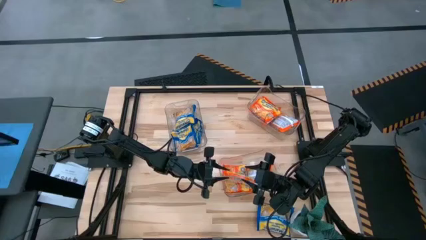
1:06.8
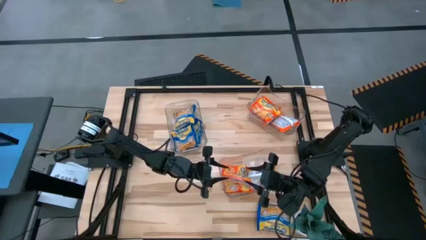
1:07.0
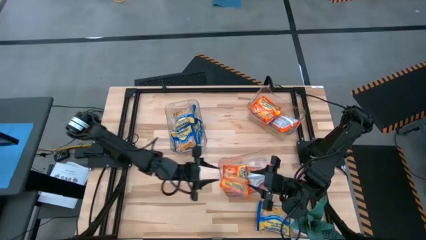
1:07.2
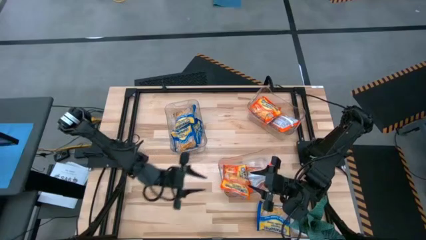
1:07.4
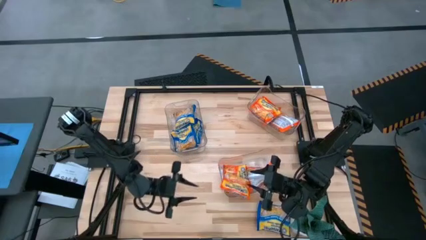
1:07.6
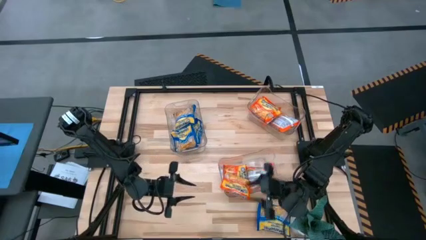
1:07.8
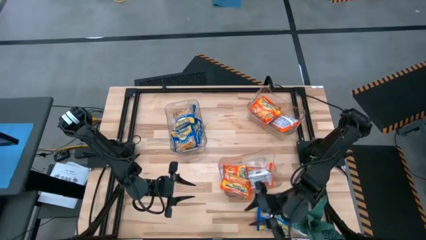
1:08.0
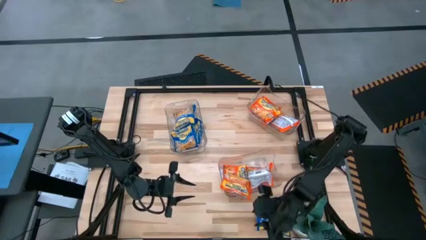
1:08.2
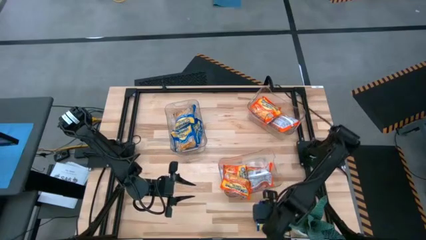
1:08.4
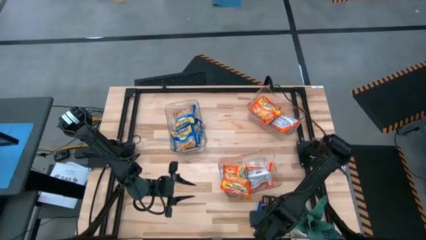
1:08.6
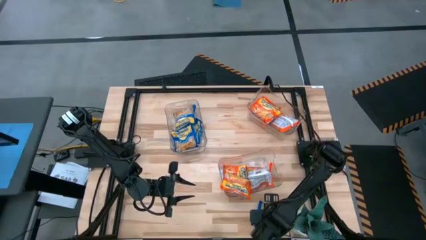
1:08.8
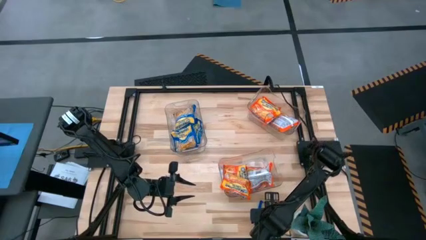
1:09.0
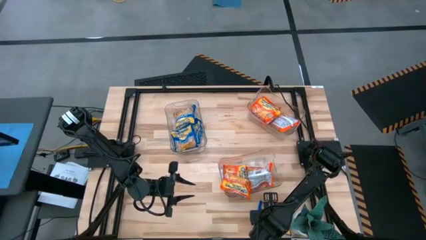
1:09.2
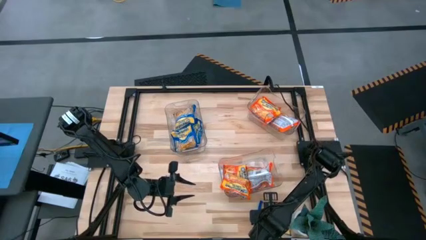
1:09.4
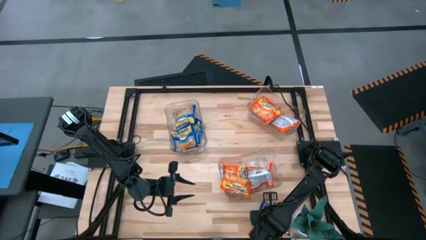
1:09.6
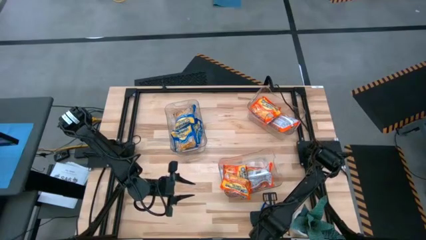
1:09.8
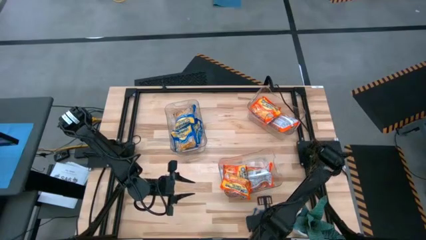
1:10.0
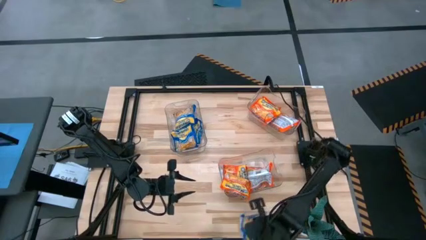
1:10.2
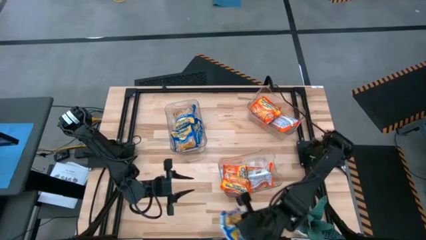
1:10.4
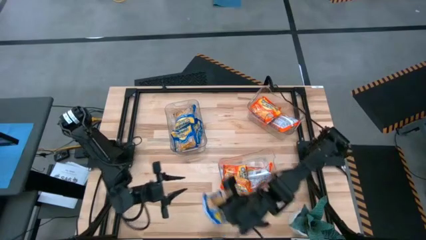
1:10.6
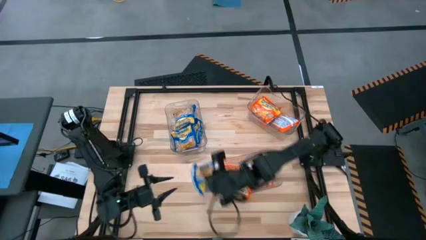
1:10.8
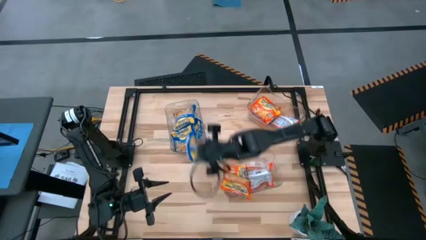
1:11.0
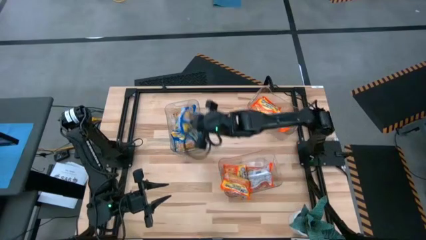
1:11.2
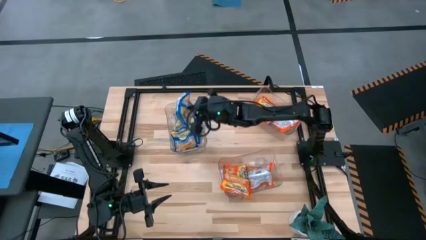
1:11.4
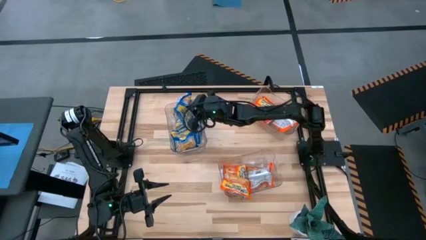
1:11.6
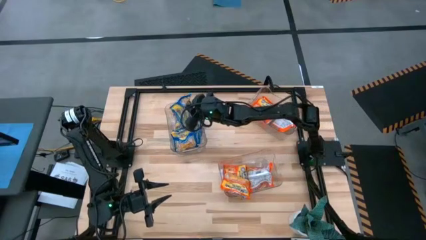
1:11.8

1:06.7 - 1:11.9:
Task: Sort Maruchan noodles
Put the blue noodle pack into the middle transparent bin

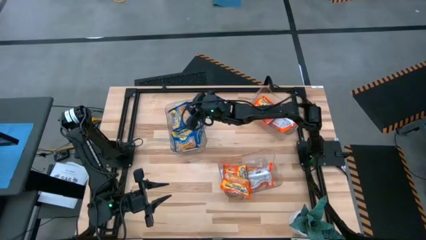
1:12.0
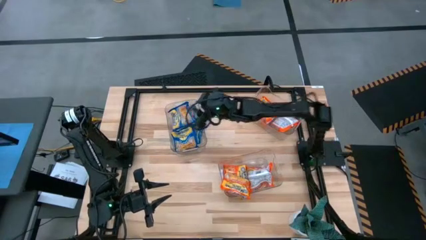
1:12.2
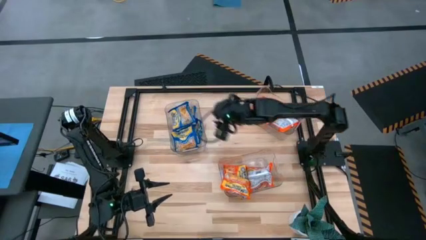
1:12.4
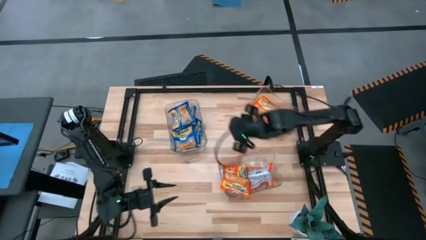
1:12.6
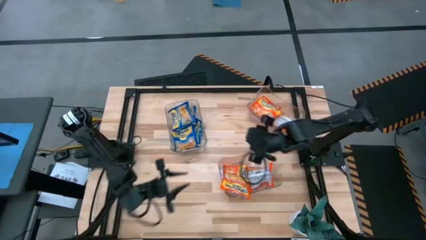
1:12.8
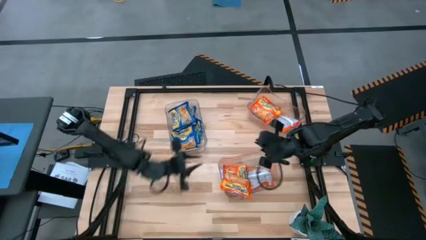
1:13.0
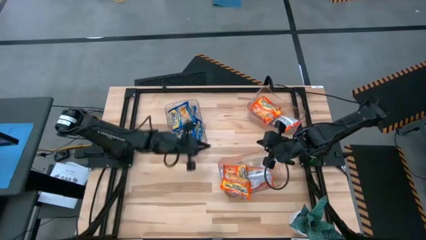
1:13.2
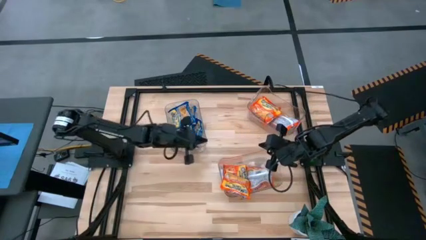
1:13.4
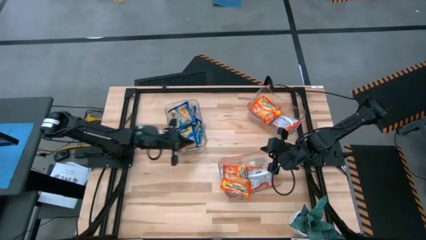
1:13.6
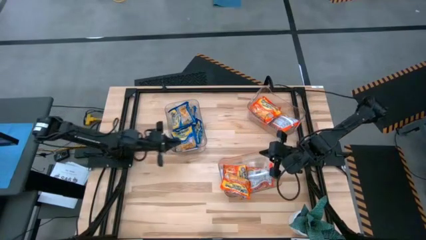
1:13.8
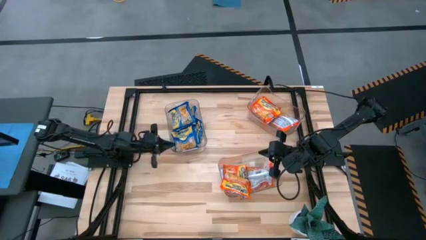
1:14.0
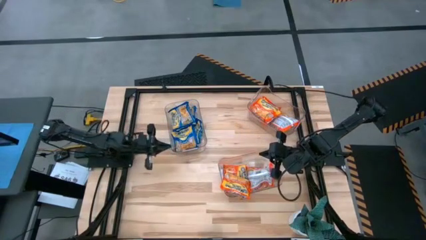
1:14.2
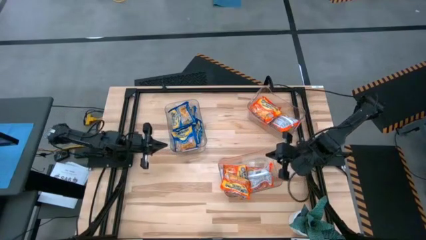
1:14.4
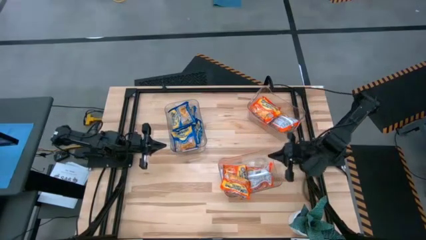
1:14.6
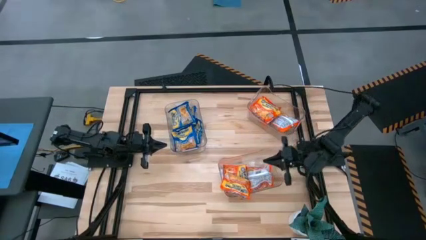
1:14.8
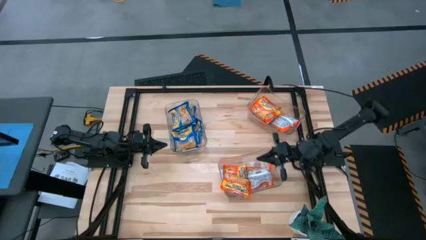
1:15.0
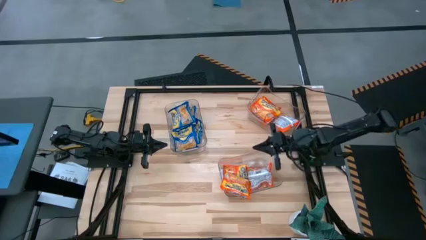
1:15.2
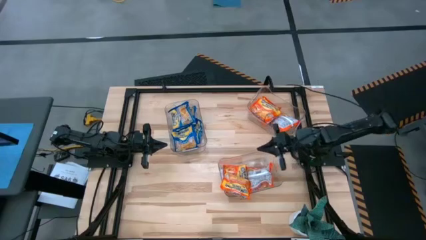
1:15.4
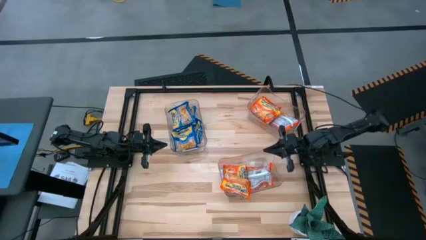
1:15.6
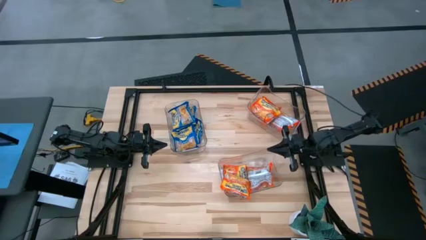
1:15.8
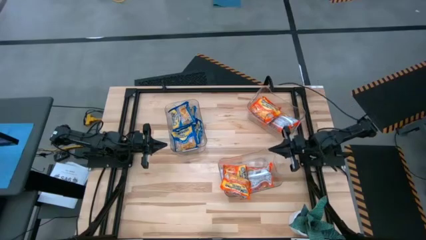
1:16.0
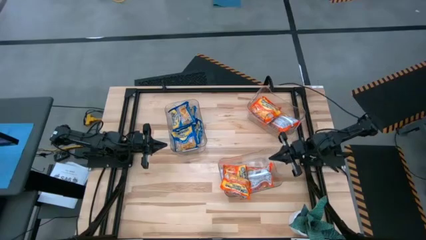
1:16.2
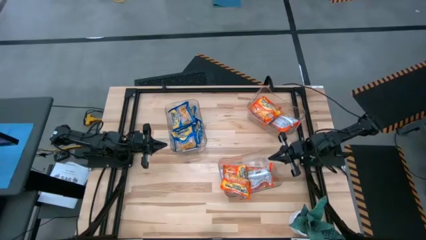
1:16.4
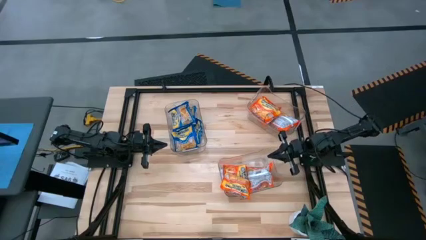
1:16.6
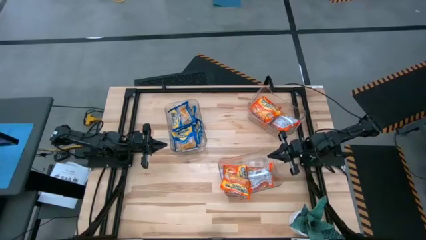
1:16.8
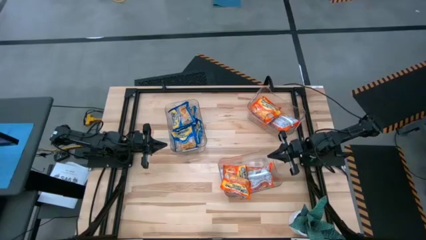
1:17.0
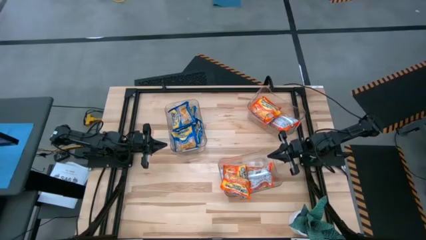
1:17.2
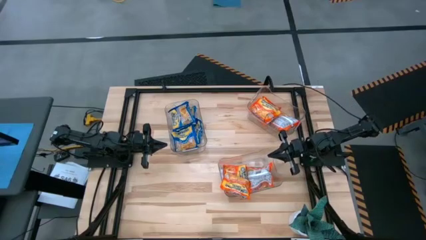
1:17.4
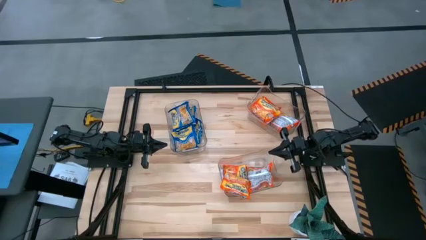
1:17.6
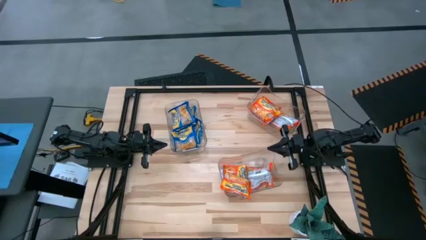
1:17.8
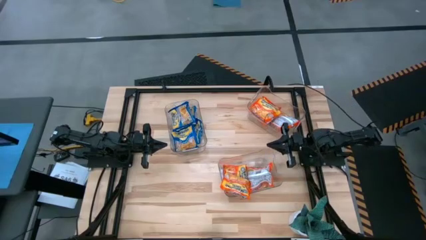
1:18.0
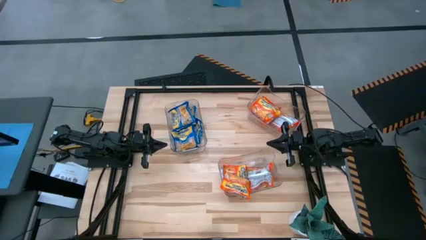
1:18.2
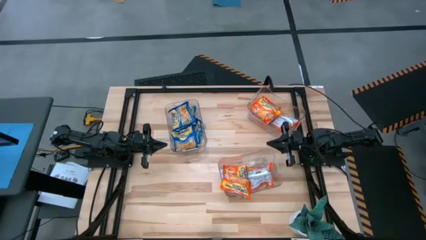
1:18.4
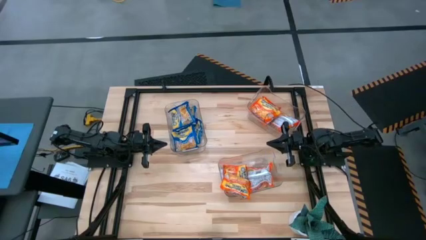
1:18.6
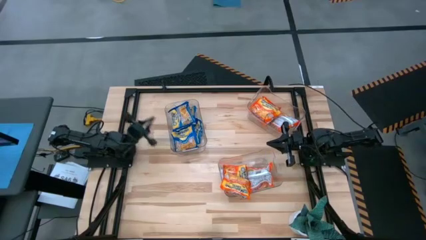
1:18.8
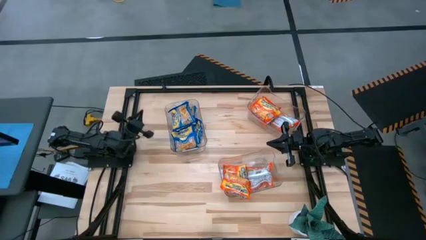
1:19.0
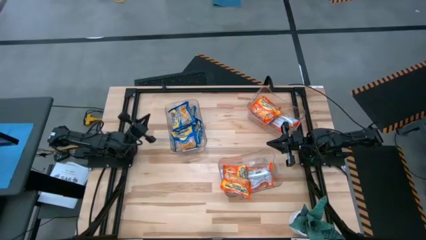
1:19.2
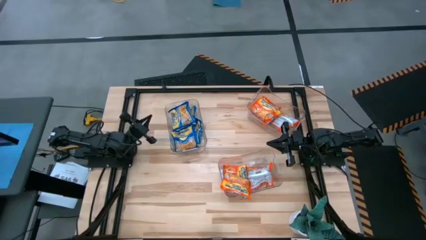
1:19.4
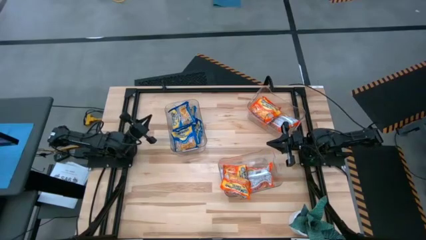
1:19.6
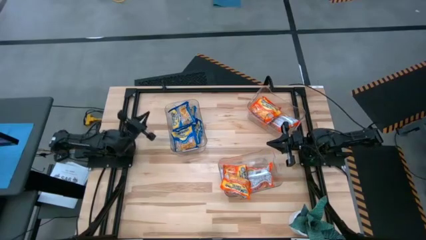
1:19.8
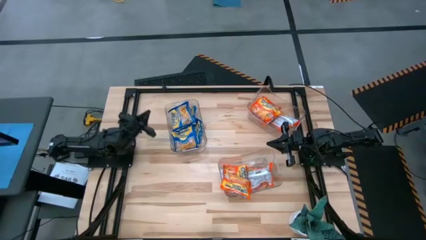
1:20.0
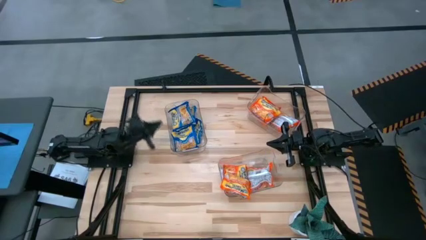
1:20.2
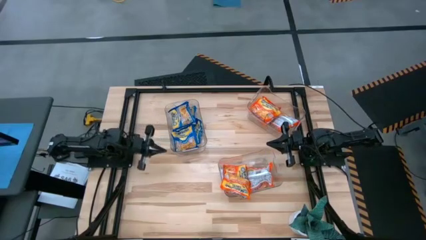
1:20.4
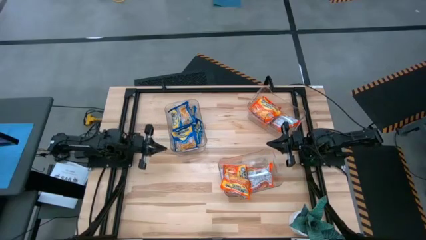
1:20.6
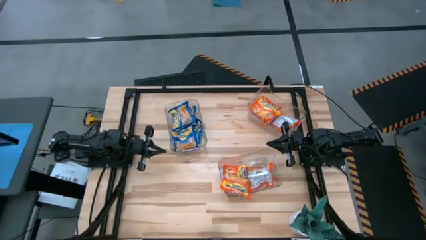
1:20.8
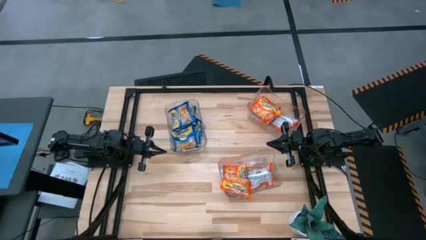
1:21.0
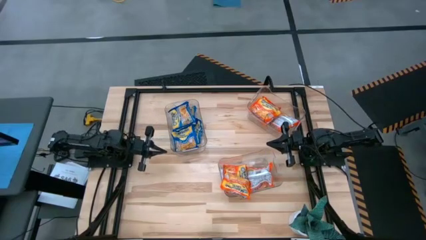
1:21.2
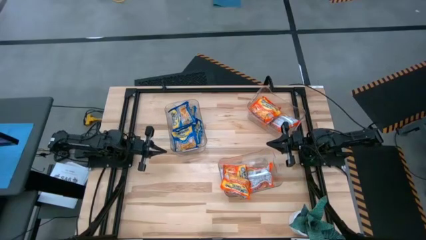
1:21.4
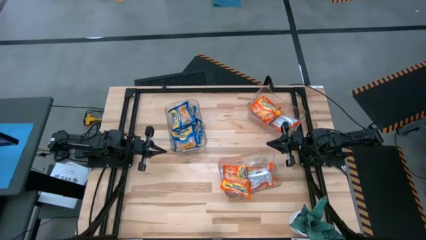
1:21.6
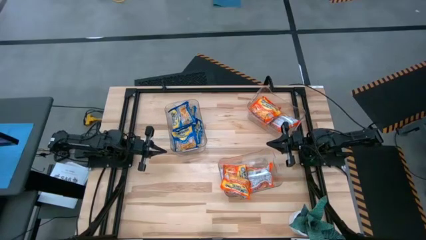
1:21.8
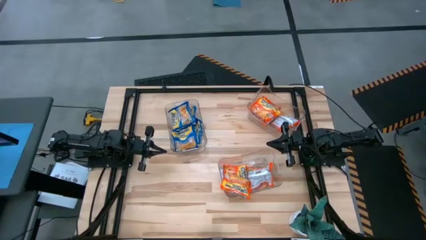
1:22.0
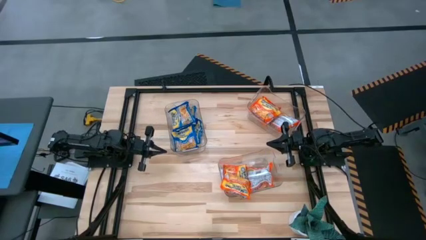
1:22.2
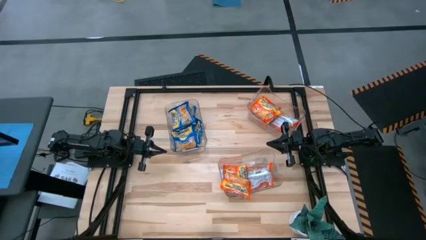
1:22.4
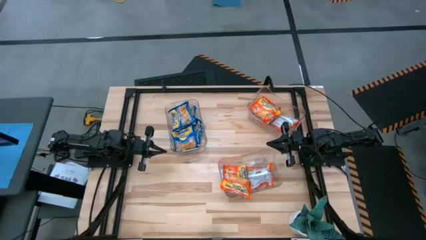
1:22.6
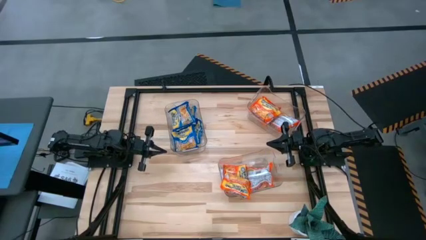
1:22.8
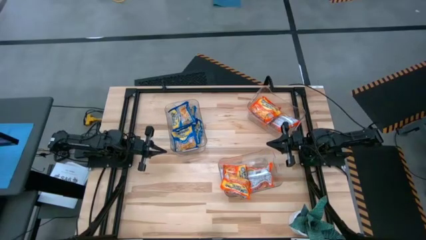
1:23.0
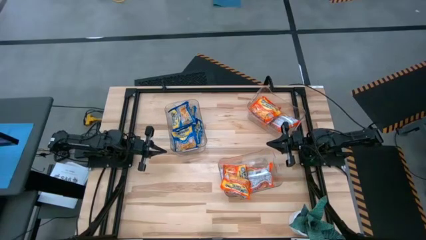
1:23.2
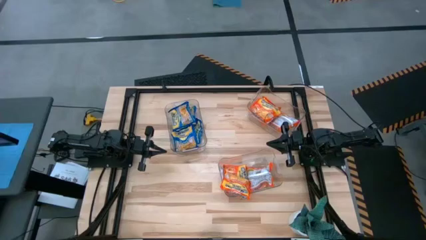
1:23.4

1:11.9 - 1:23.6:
Return to Home Position
